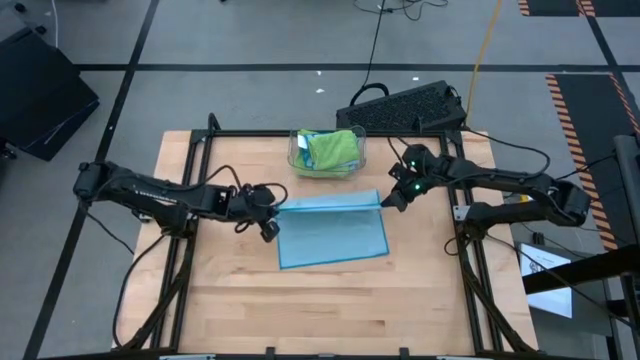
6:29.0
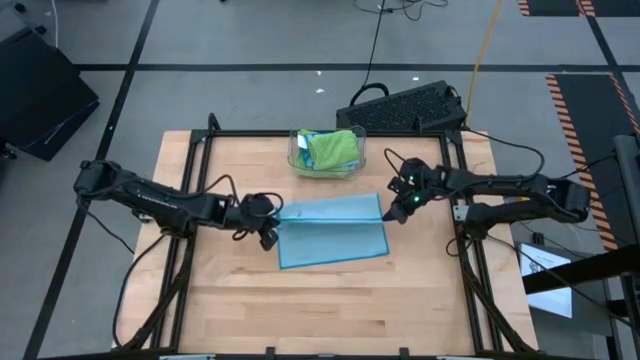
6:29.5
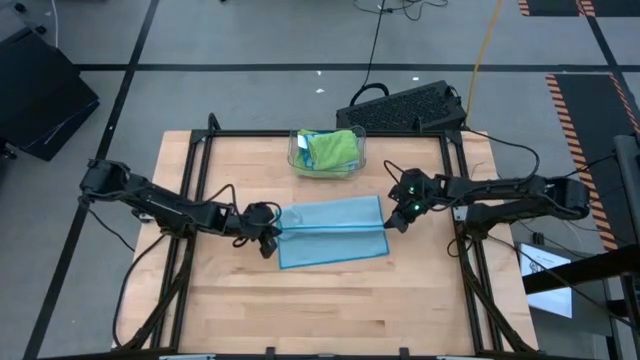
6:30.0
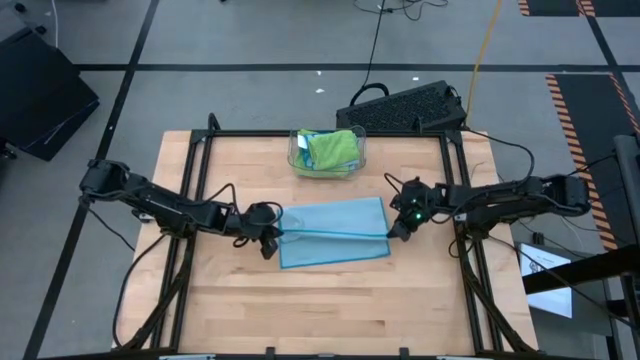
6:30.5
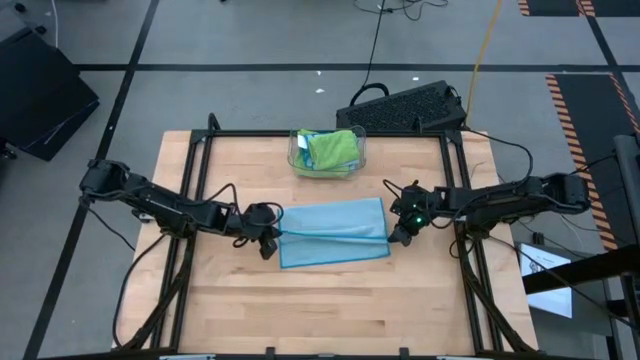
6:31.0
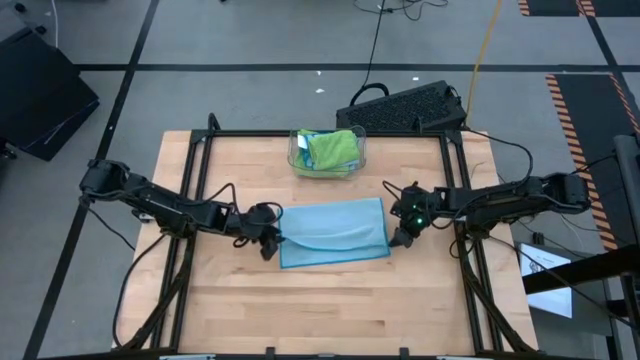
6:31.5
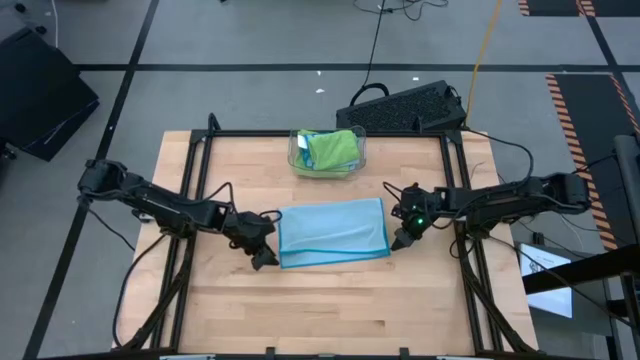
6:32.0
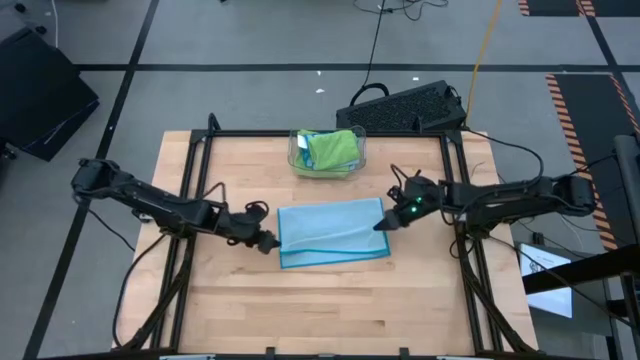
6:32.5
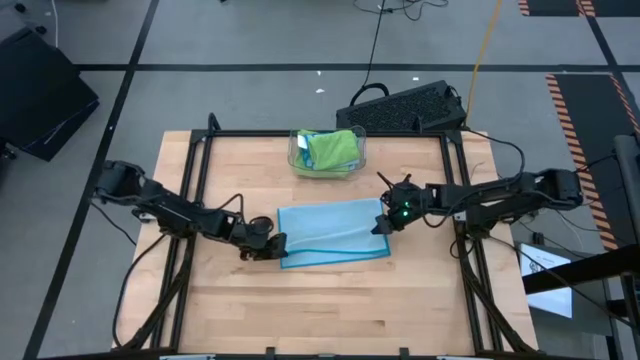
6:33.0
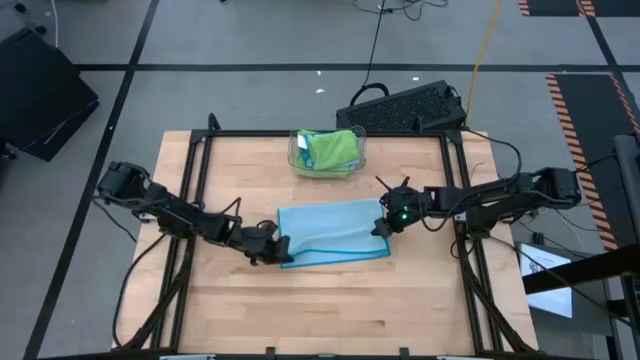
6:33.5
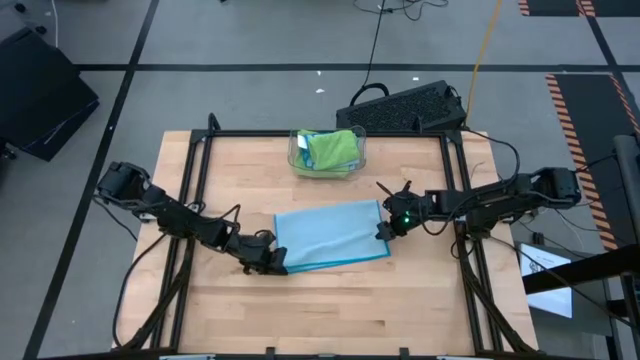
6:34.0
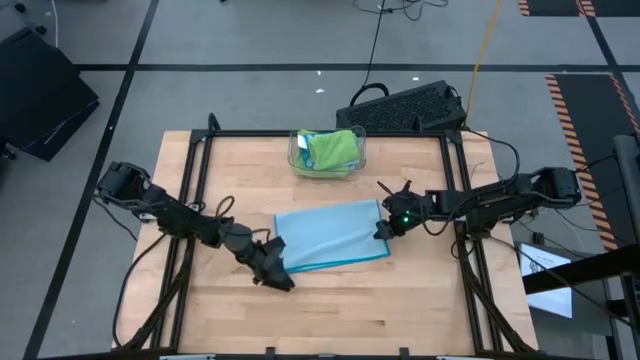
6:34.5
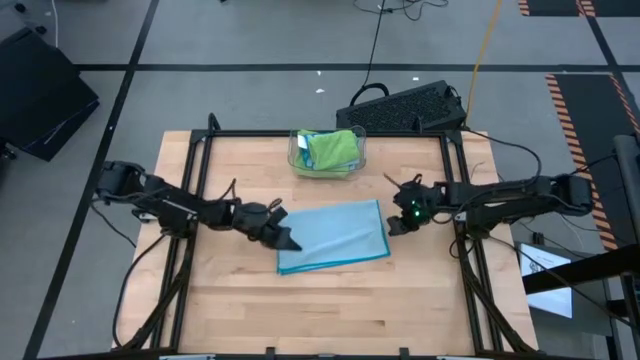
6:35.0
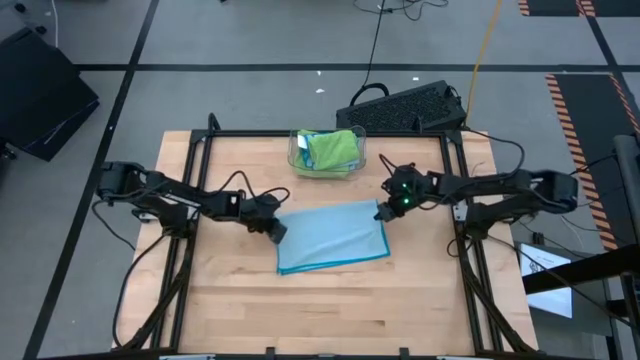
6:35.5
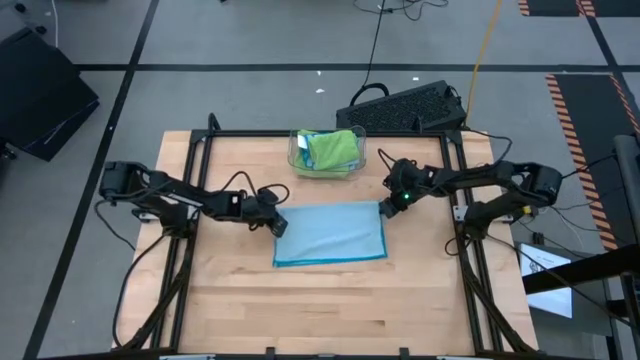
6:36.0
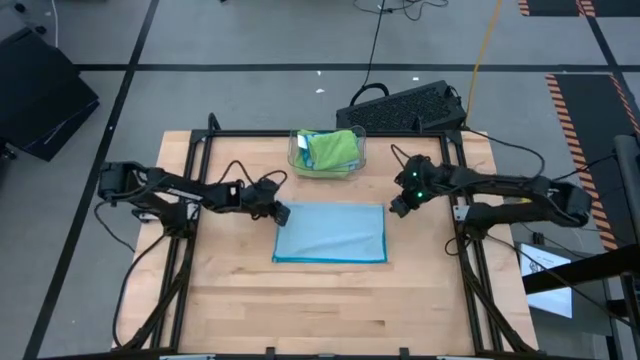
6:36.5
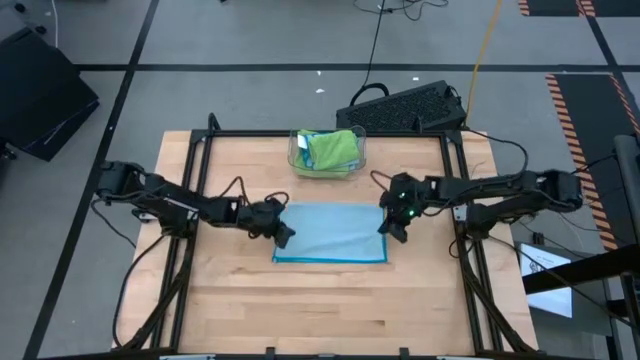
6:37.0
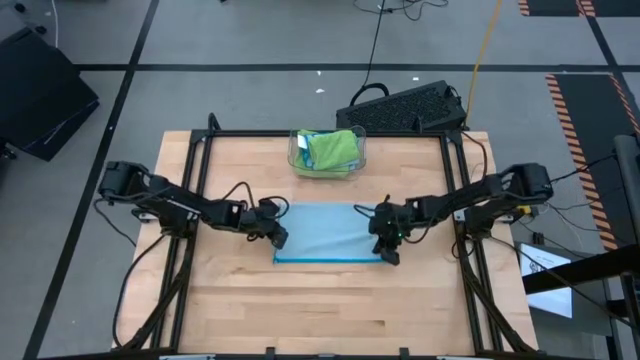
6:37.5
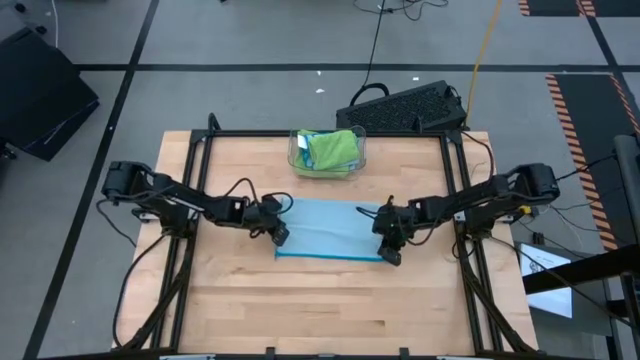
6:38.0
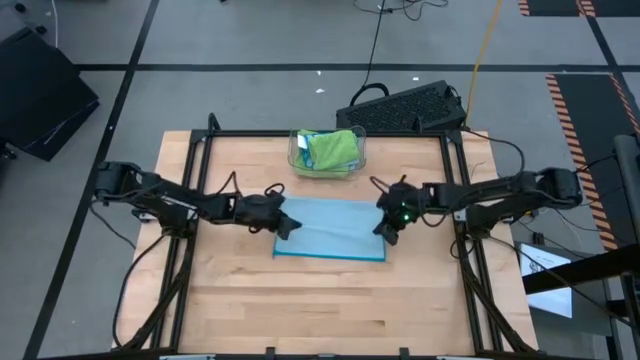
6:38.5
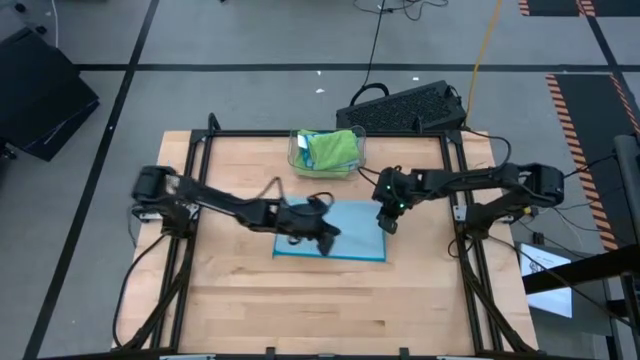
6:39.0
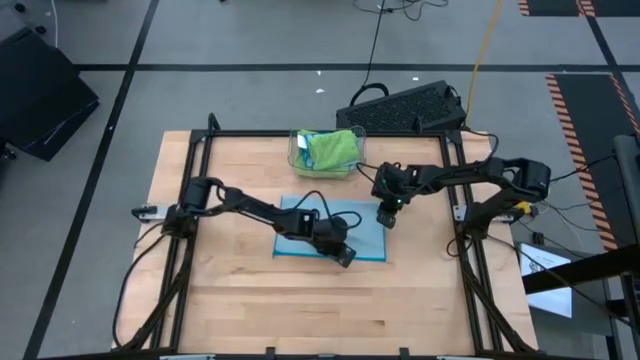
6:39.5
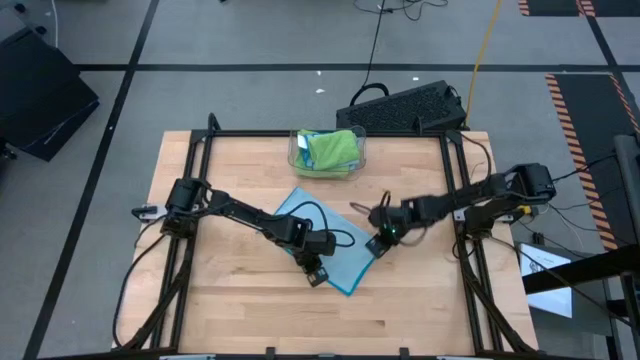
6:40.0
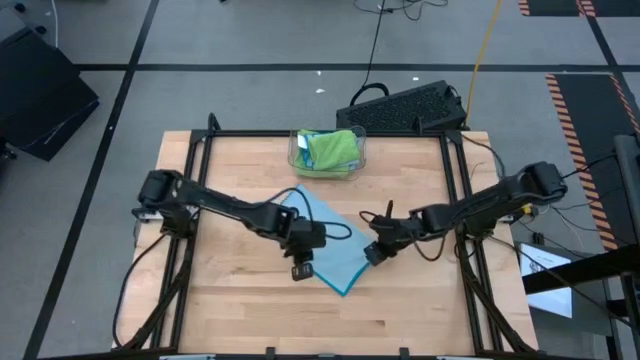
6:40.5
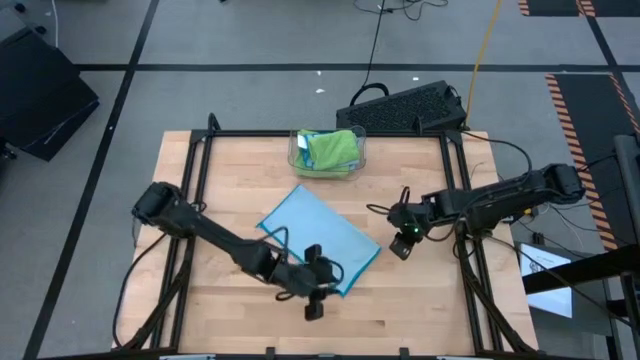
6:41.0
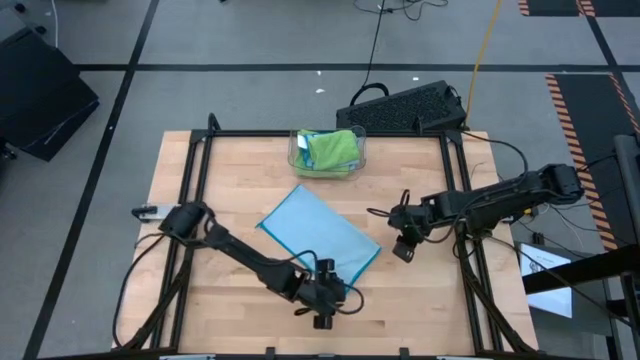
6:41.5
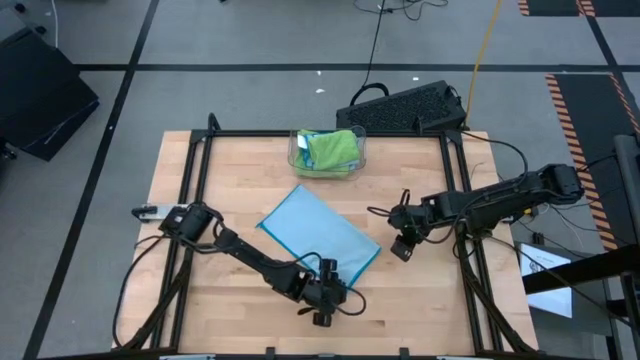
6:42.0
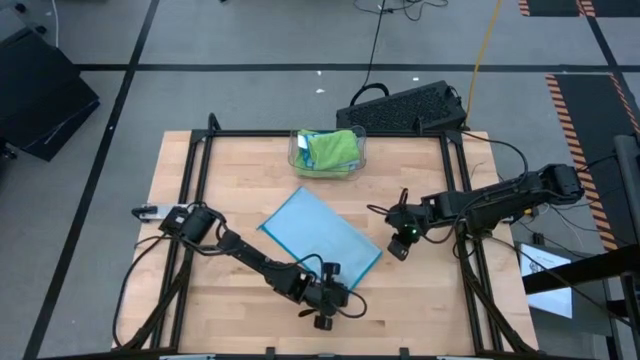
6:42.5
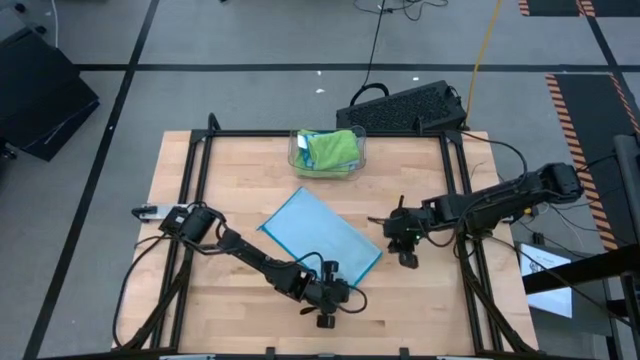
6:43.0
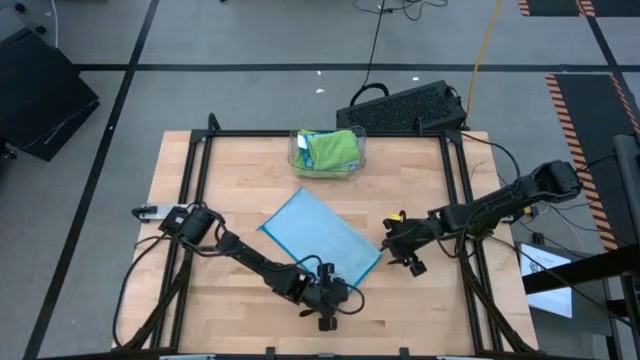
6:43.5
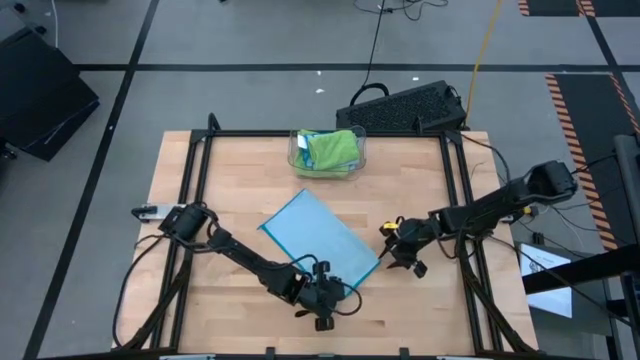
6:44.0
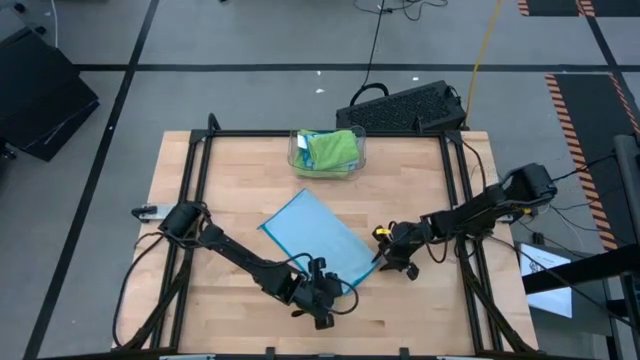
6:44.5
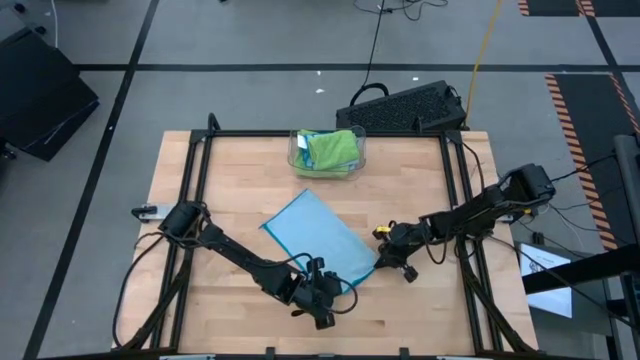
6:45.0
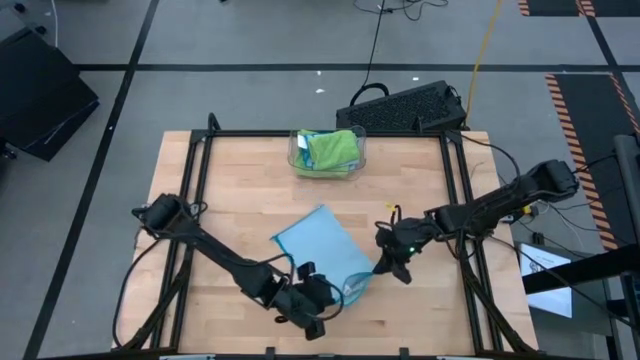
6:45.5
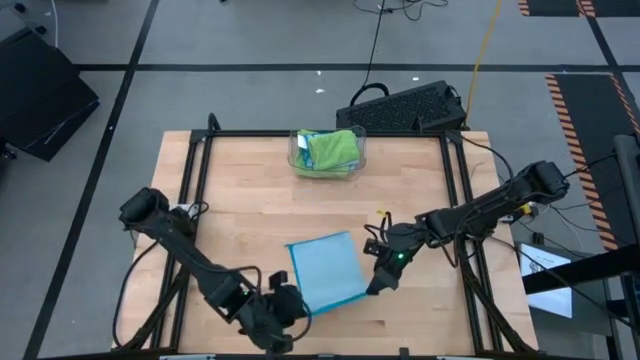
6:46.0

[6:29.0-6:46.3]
Task: Fold microfiber towels
Fold the blue microfiber cloth

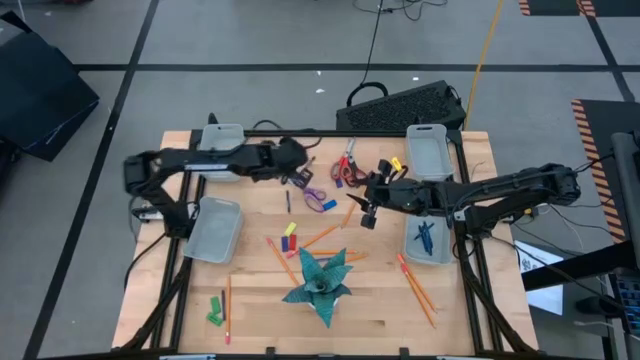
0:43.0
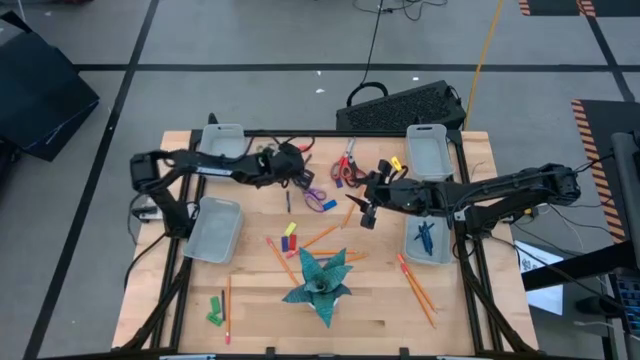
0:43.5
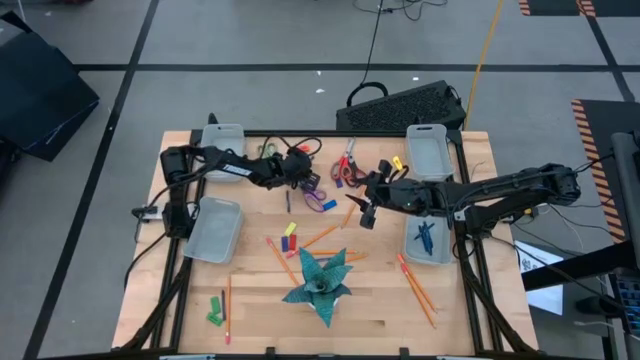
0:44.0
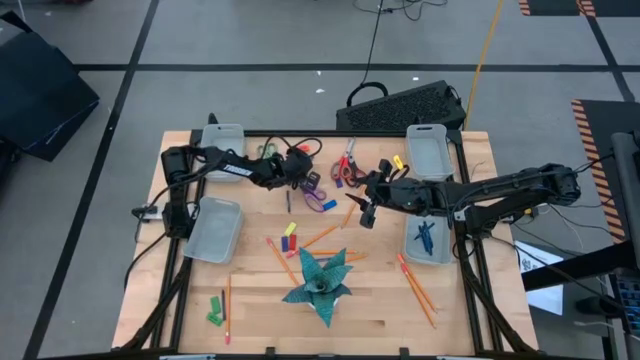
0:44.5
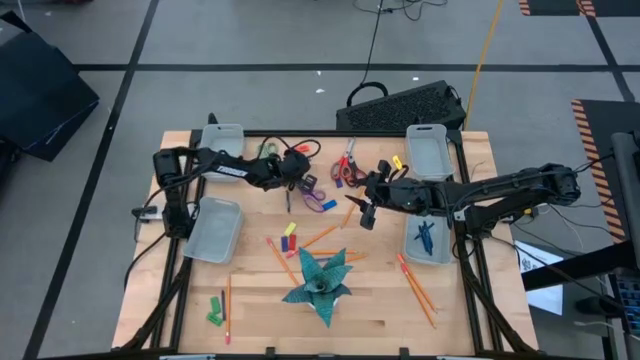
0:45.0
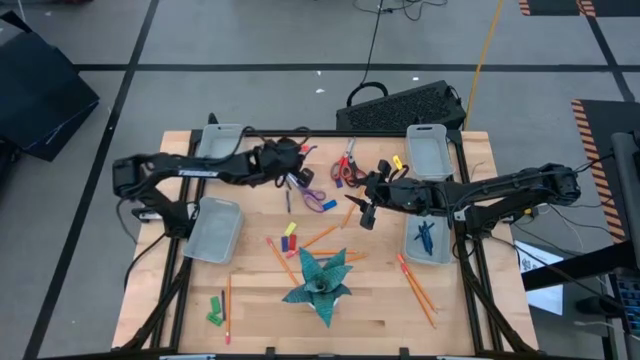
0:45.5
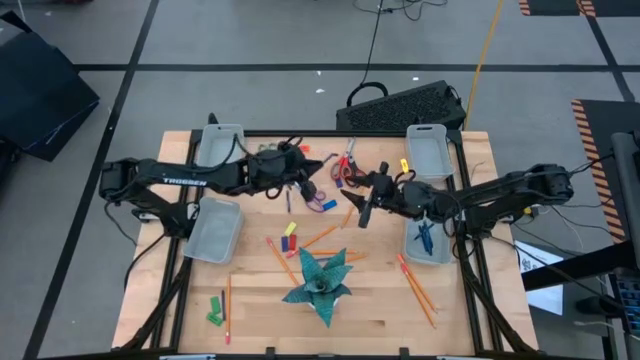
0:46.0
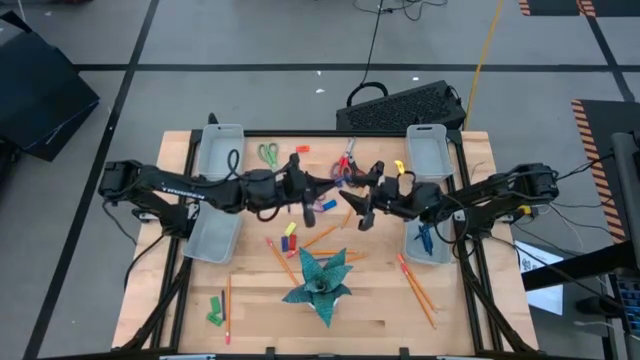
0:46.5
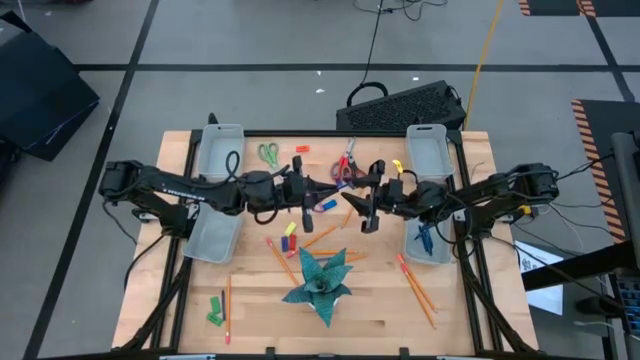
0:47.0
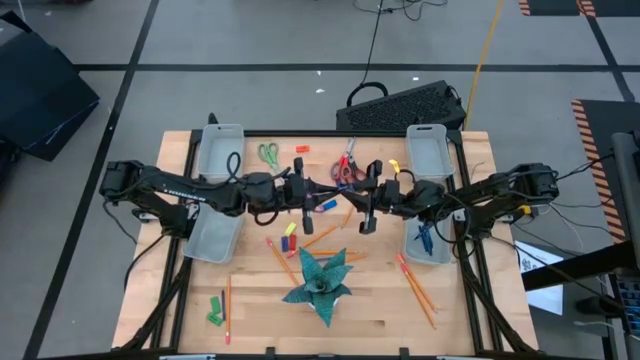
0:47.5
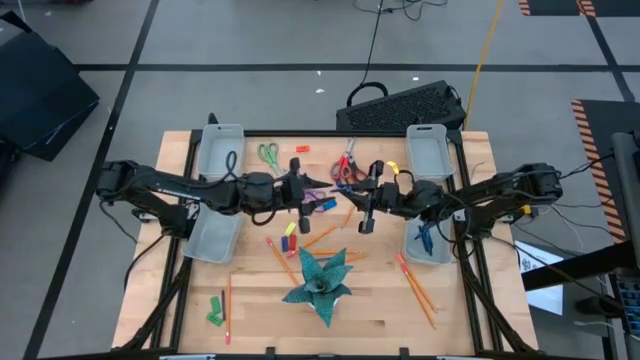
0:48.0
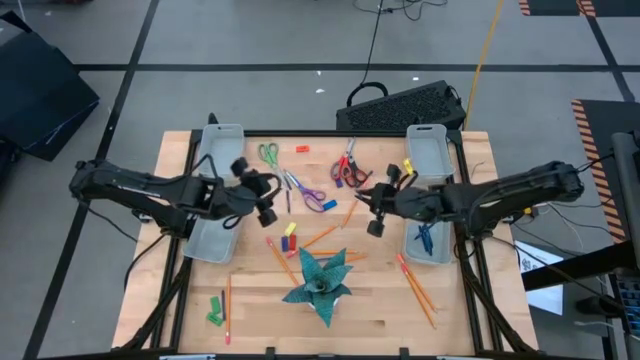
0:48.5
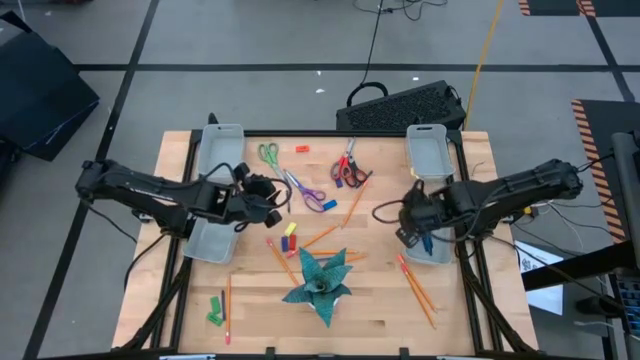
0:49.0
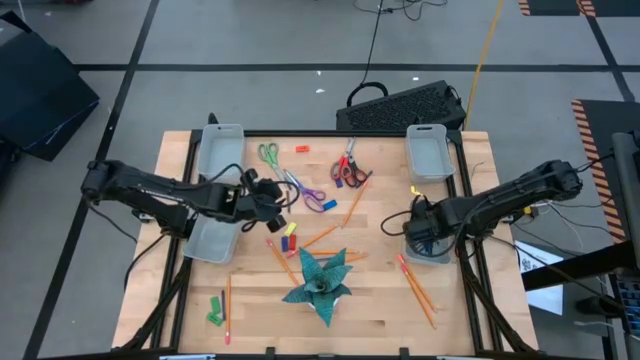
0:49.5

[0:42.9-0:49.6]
Task: Sort crayons/erasers/pens/pencils in bins
Put the blue crayon into the bottom right gray bin
